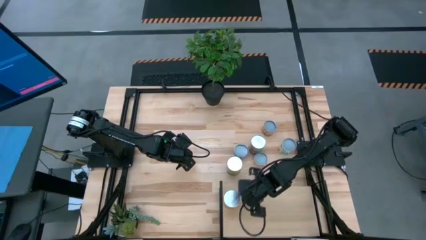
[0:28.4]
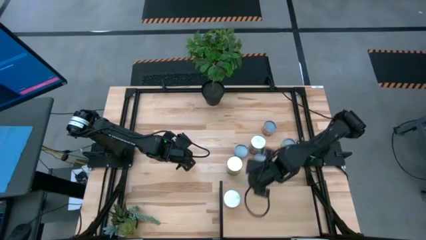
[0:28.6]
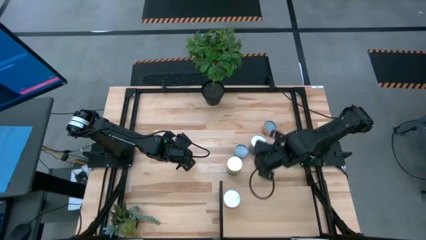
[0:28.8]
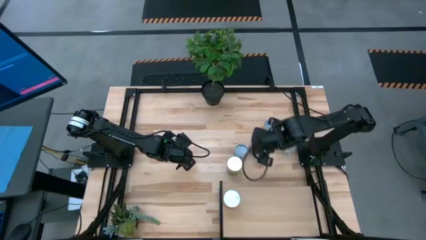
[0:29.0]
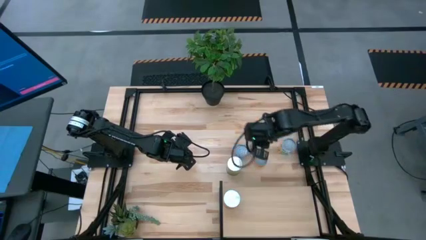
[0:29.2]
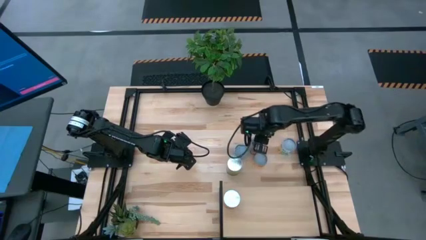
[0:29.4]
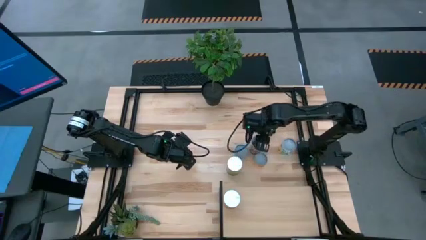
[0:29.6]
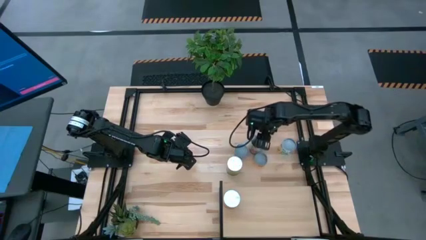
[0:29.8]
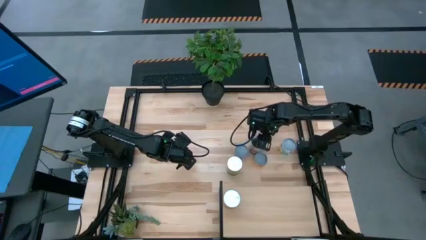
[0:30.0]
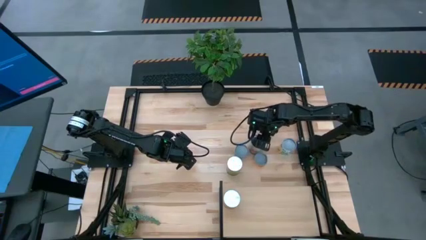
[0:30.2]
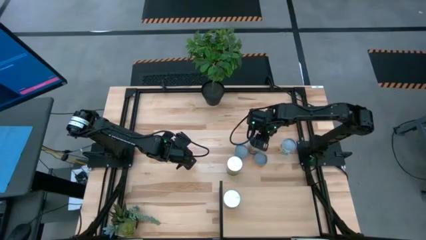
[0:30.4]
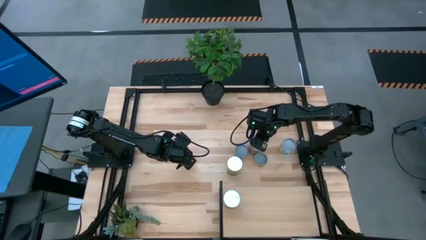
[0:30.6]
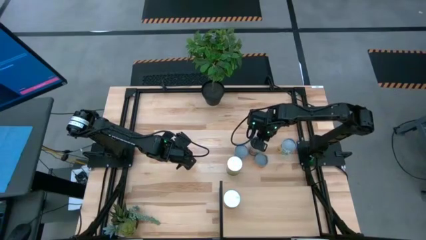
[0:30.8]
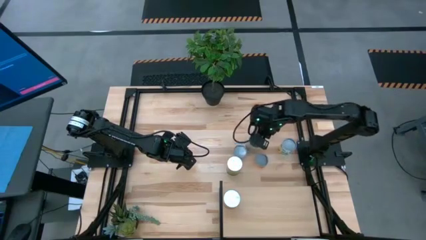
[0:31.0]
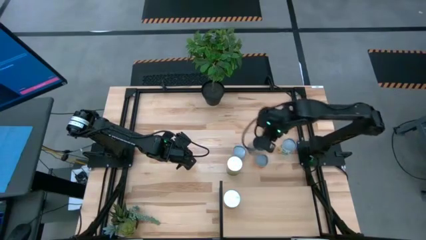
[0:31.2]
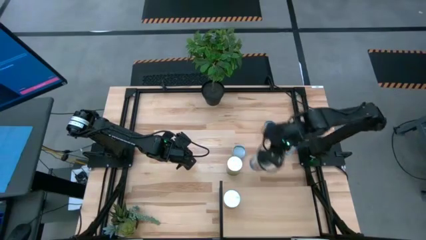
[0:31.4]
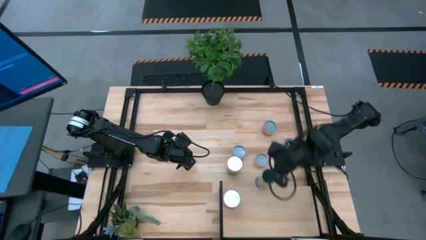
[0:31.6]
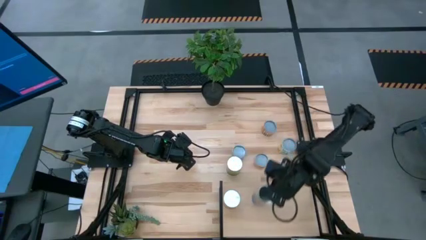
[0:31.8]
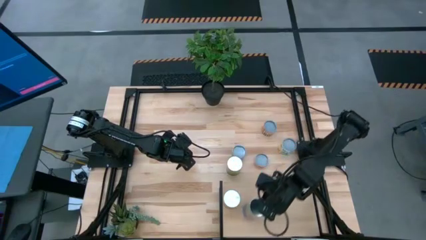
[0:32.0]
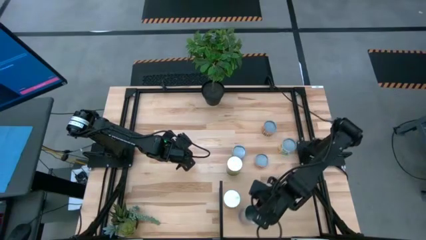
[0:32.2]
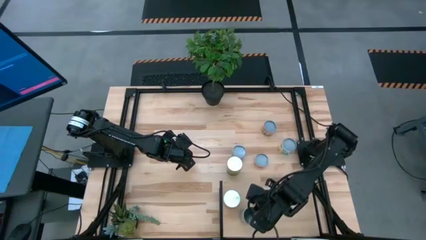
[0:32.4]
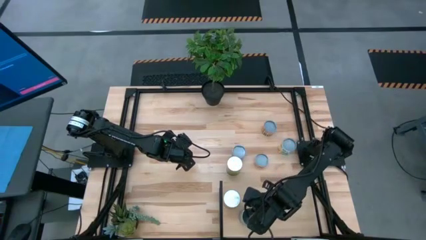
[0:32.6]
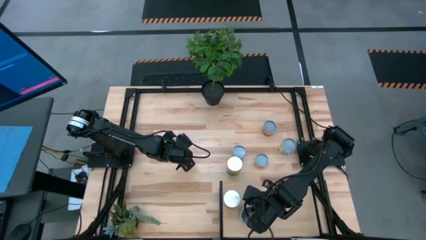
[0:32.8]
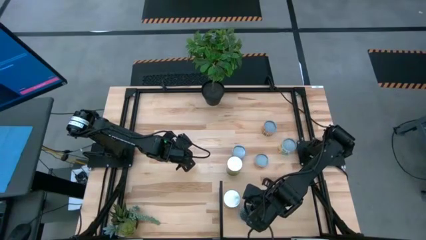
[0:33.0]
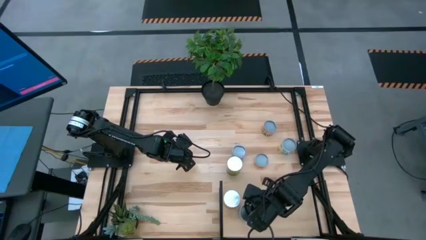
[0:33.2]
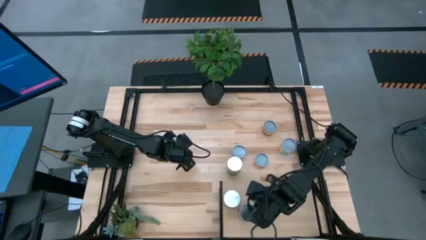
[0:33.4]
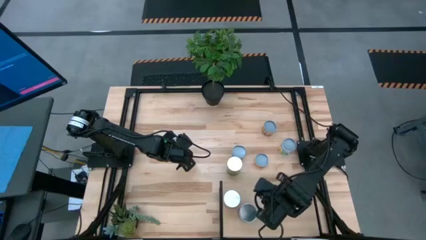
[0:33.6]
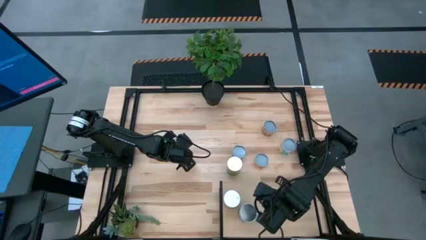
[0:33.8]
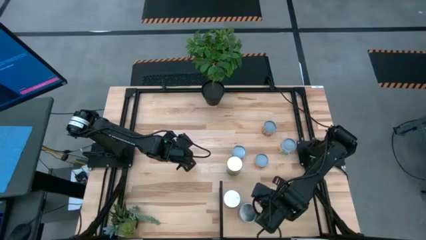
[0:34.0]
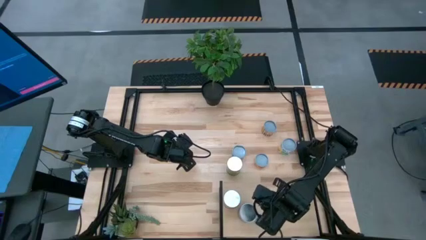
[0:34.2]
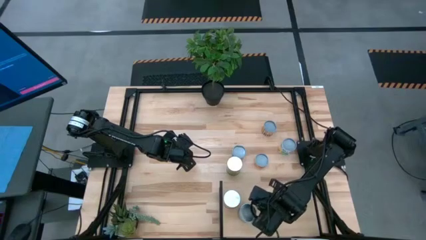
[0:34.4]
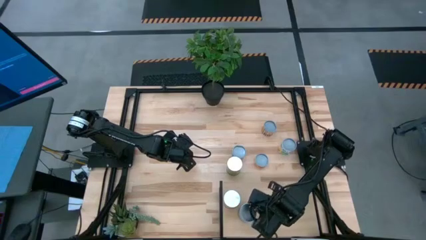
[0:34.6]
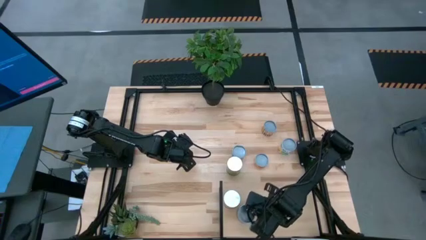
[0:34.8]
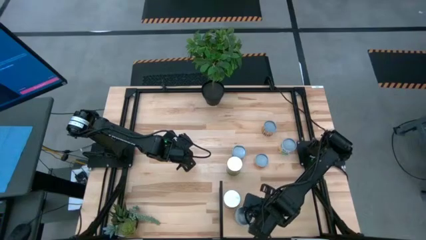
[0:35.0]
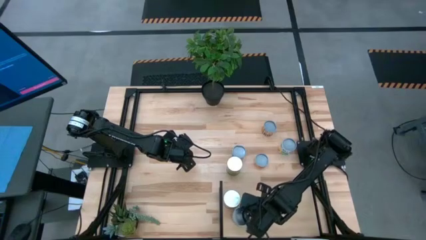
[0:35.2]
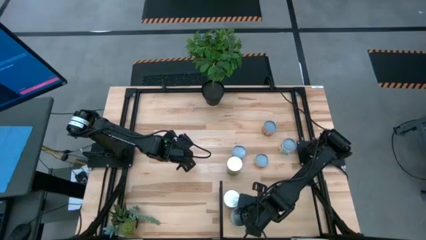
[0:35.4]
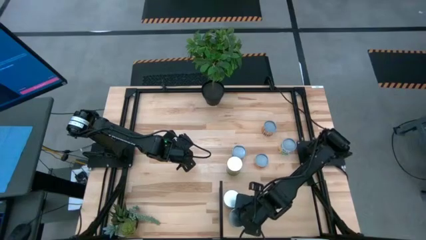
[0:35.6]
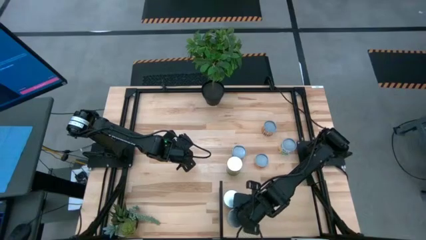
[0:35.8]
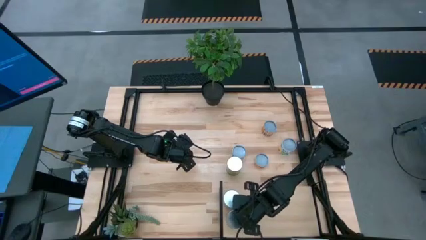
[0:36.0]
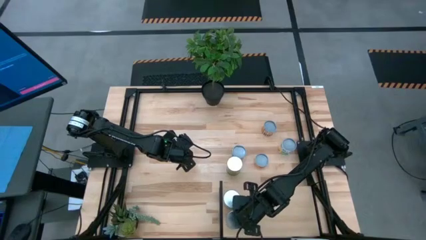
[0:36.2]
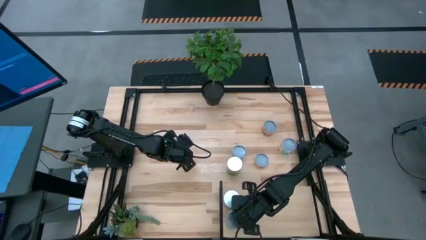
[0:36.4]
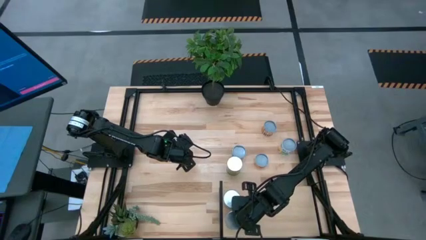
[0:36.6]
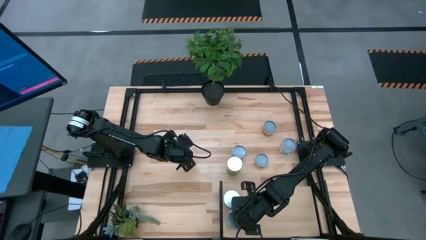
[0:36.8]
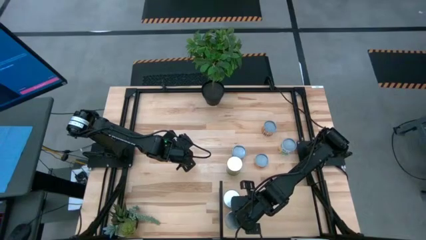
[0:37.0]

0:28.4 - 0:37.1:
Task: Pick and place cans onto a shelf
Put the canned tomatoes on the shelf

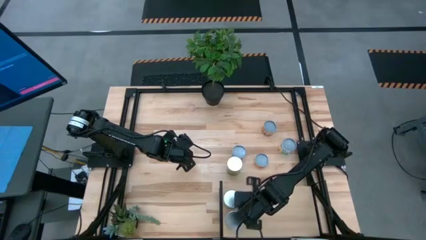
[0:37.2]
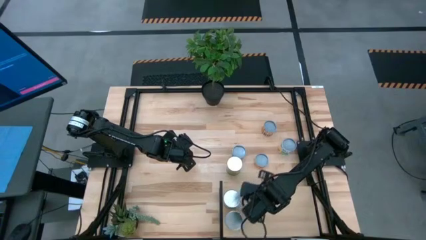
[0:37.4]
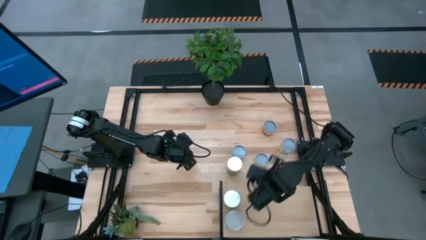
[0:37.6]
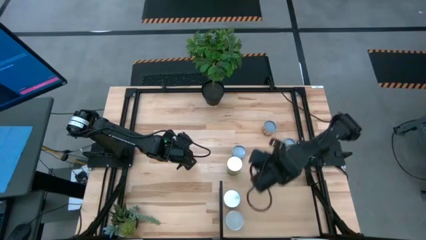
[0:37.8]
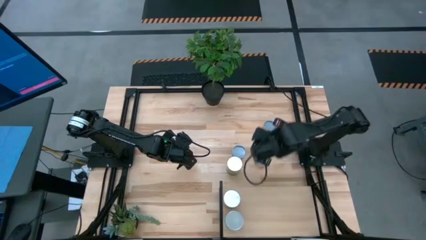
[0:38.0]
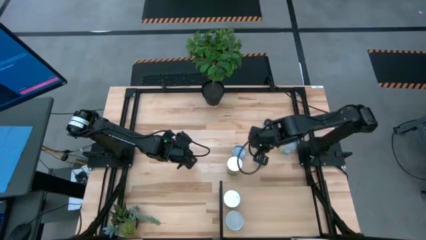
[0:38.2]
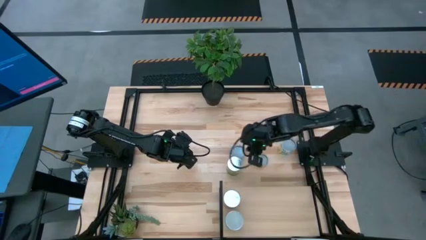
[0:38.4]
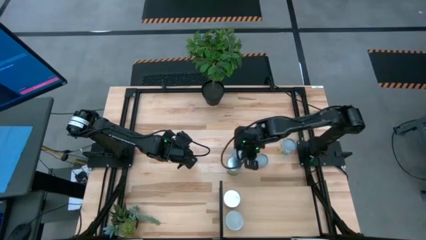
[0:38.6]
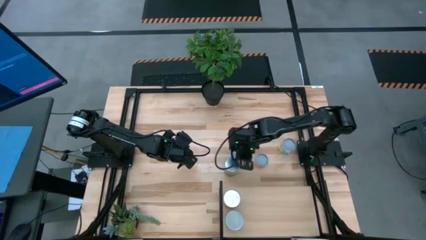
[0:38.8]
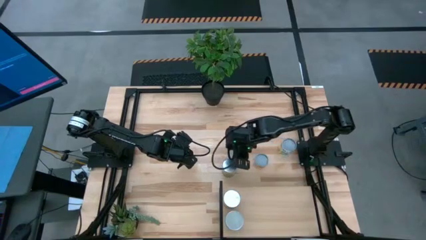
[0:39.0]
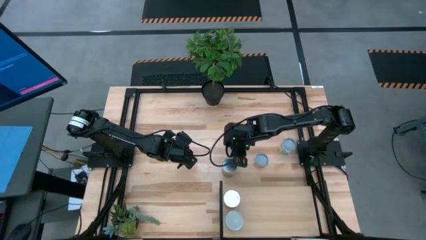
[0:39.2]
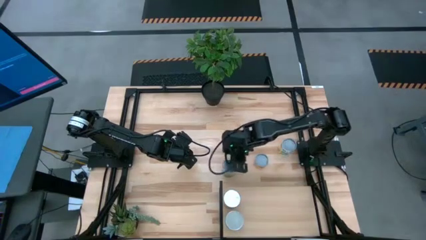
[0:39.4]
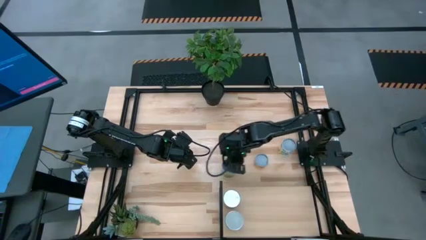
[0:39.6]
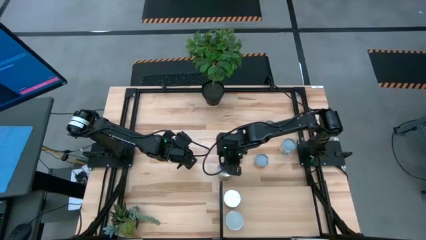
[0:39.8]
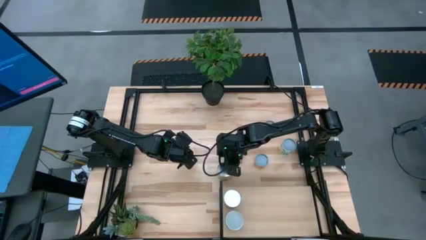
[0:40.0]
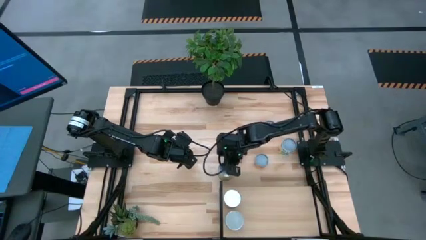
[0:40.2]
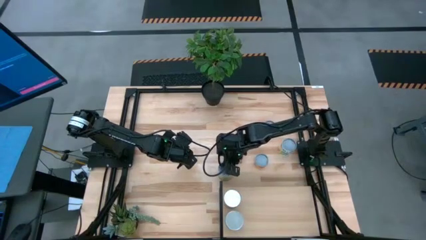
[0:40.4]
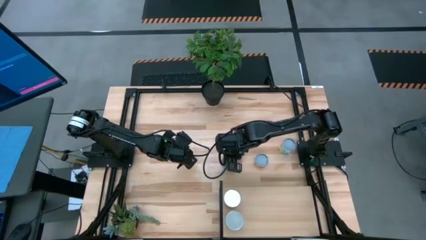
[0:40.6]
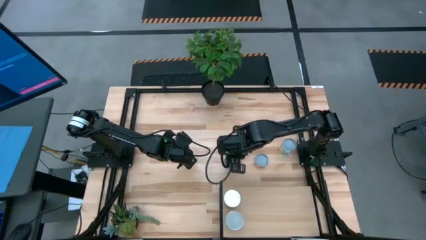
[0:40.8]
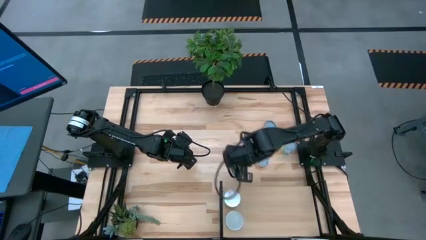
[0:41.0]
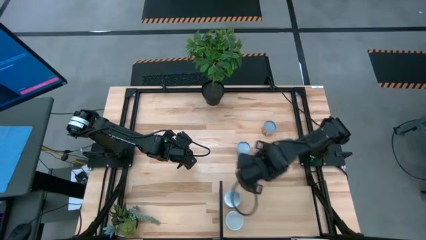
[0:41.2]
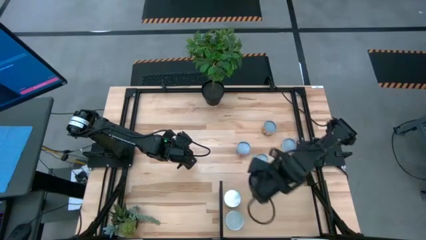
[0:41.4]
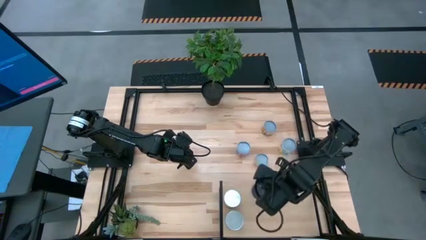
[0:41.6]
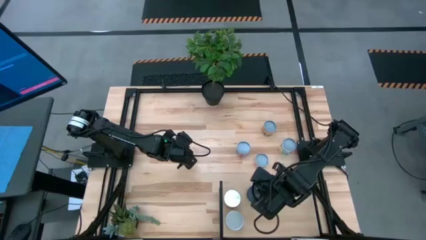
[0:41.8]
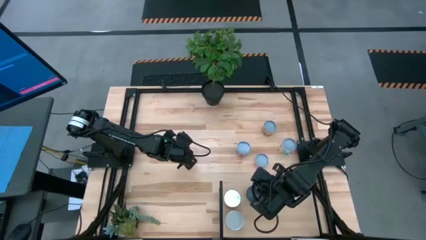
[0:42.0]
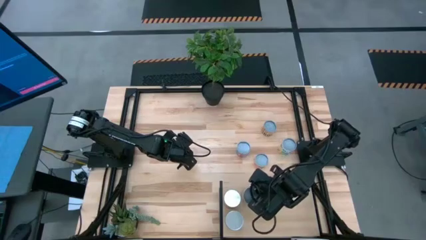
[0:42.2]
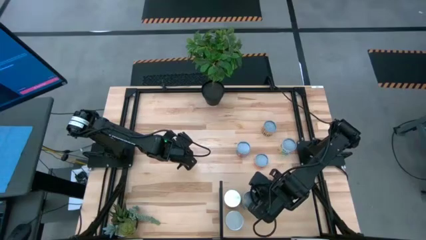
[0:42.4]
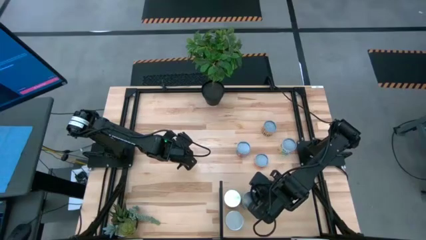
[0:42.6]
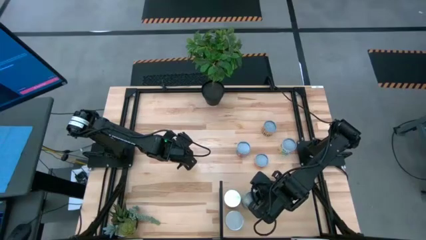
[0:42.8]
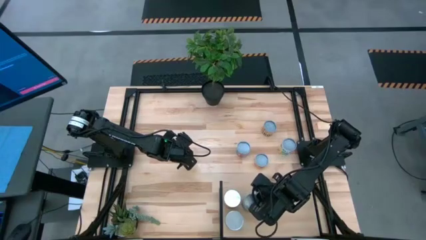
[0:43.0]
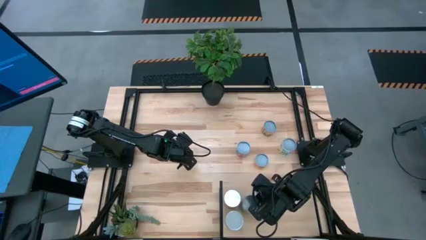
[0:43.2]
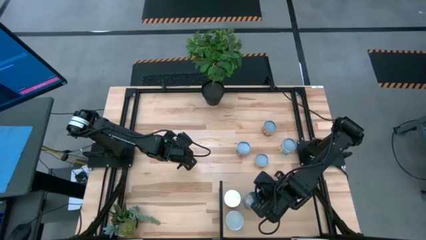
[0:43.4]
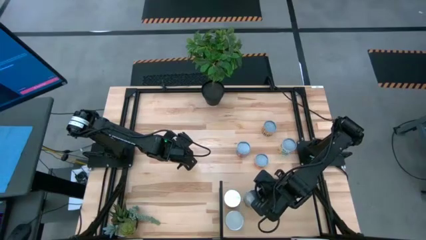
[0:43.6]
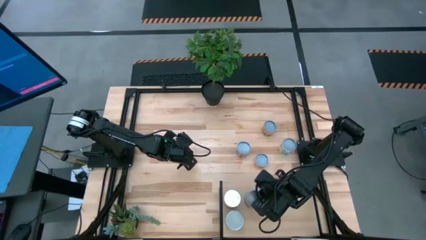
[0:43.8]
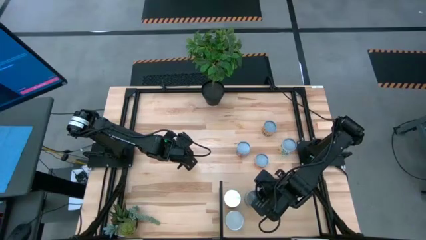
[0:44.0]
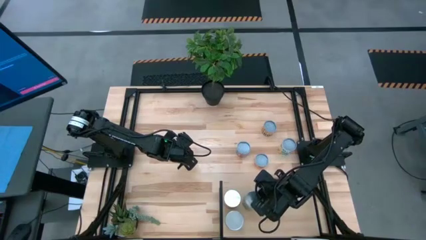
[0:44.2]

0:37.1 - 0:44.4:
Put the canned pears on the shelf
